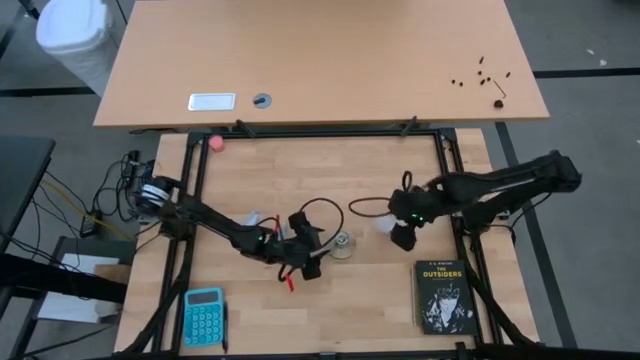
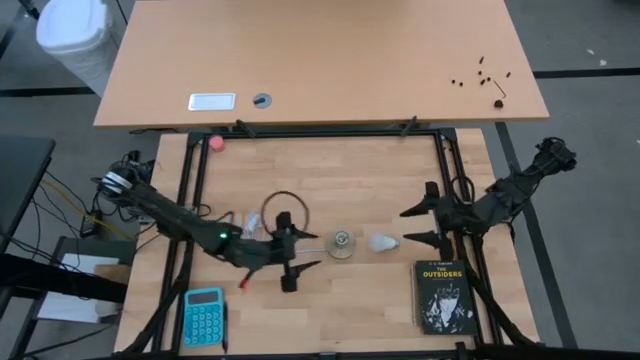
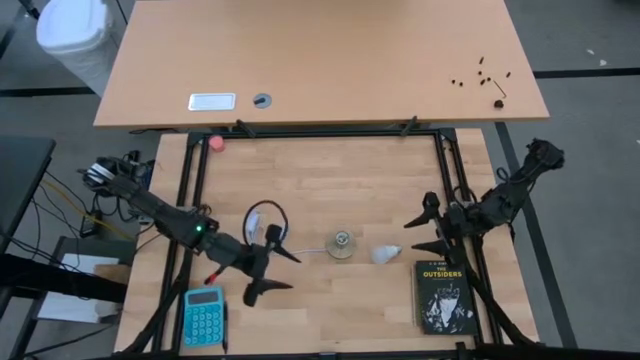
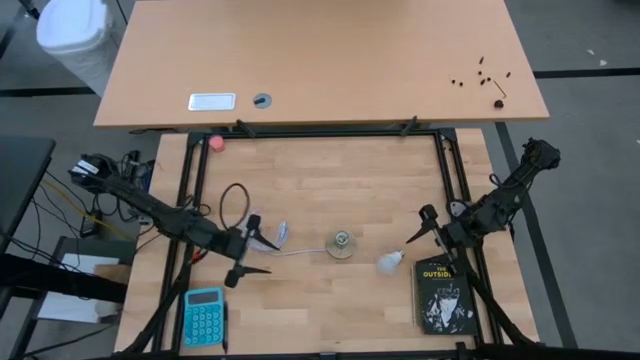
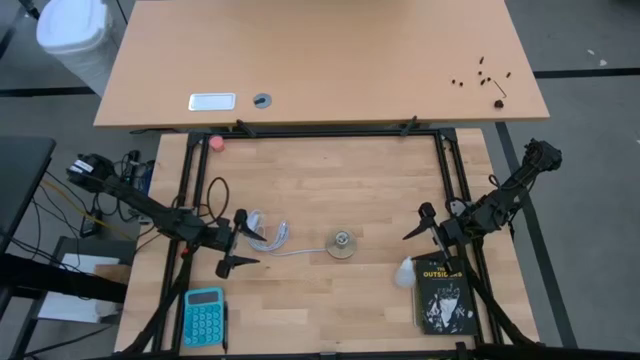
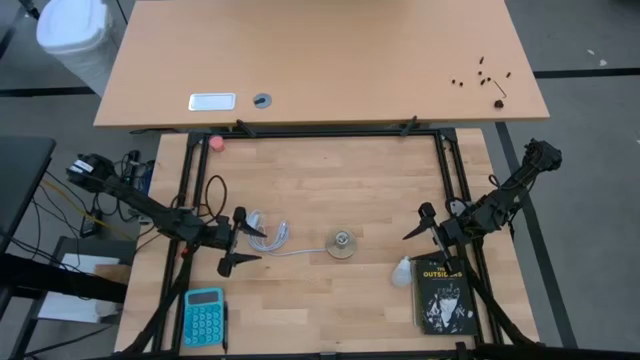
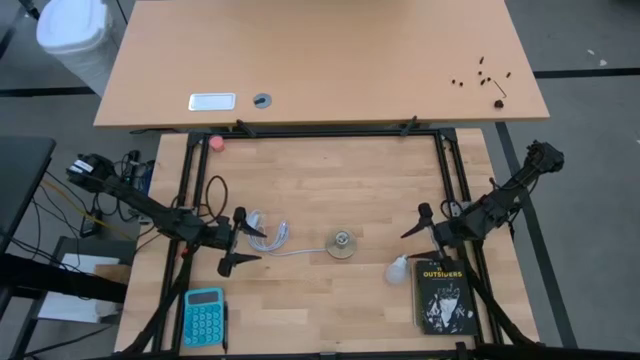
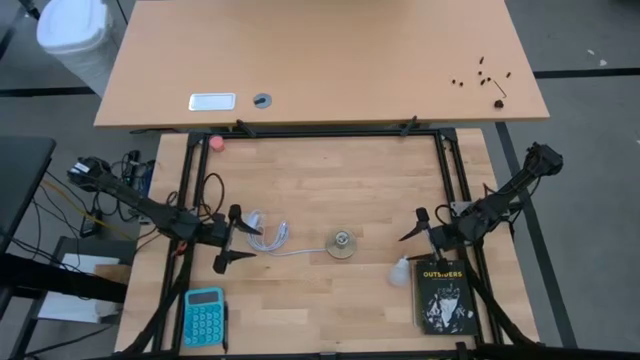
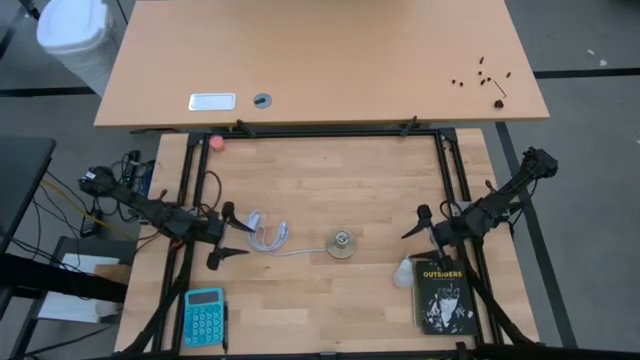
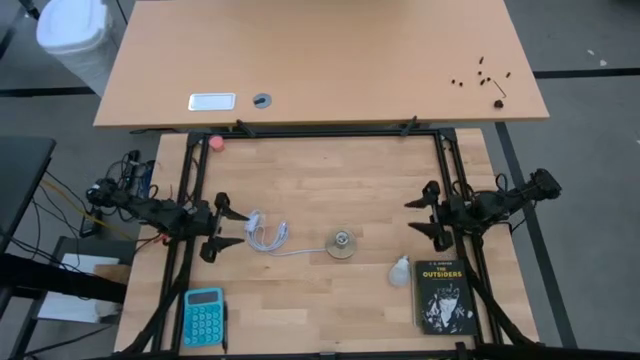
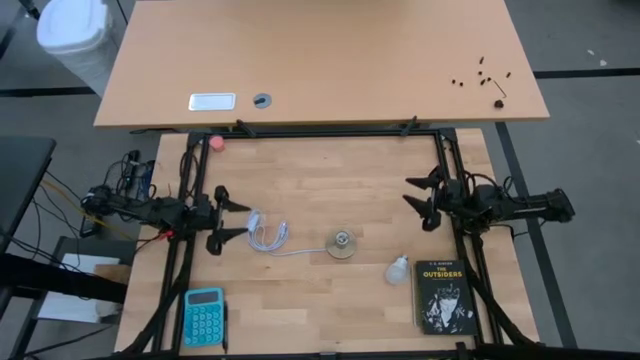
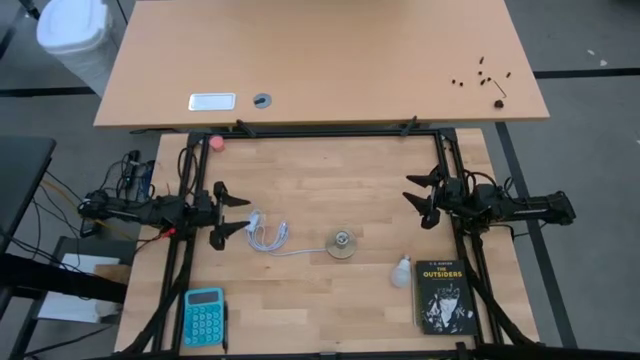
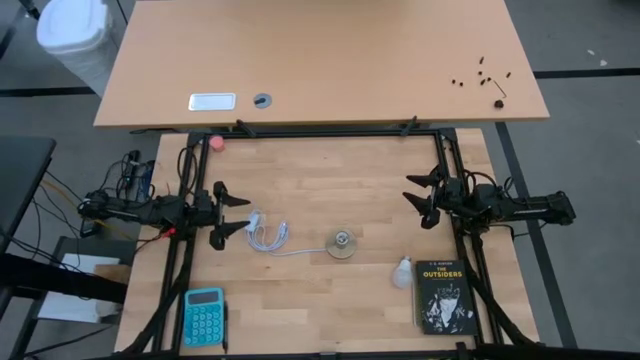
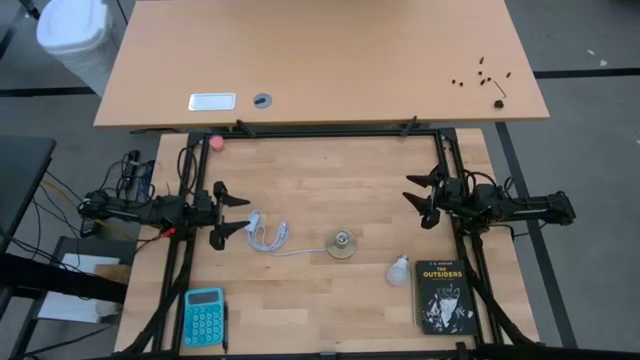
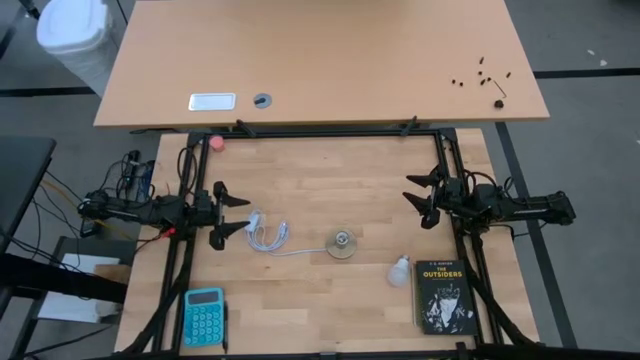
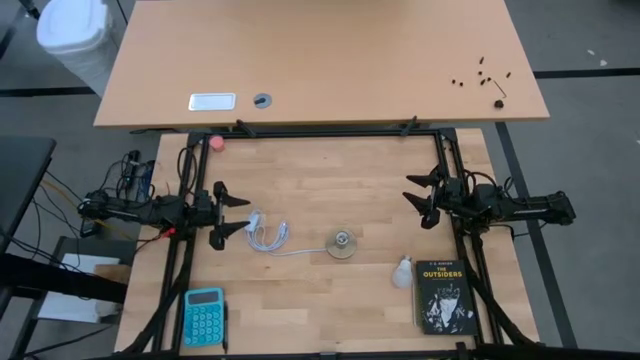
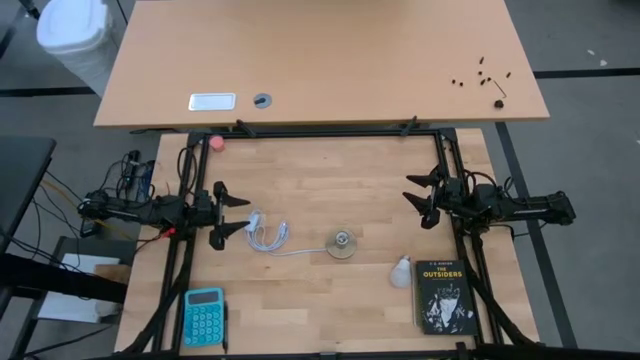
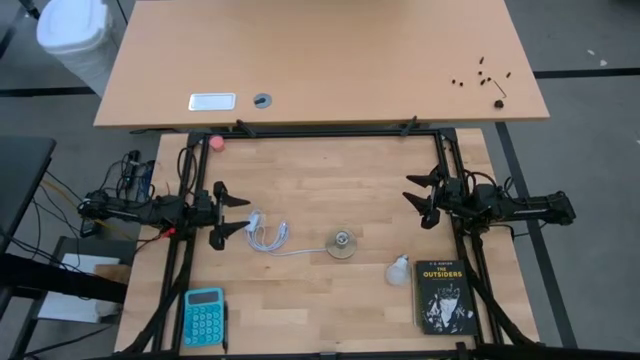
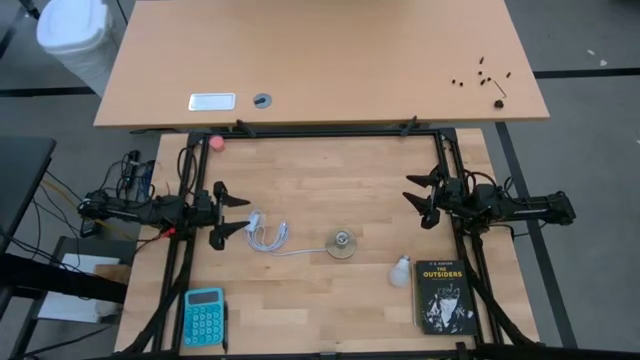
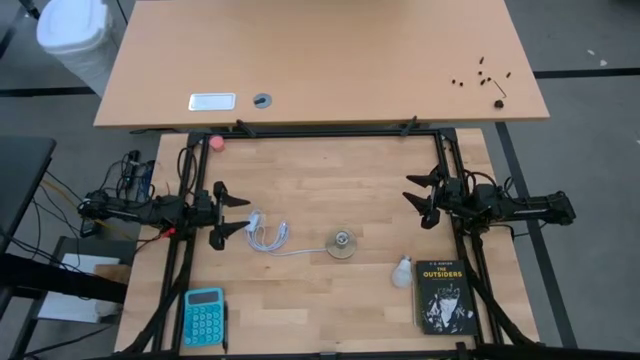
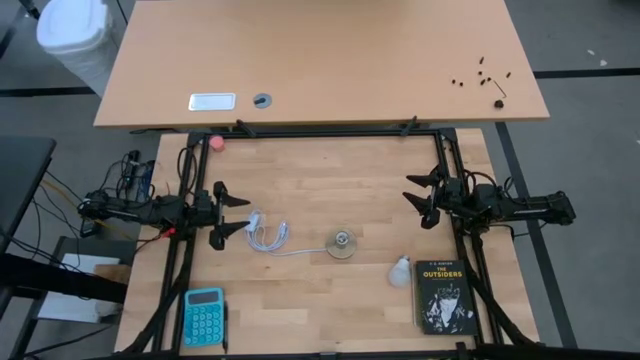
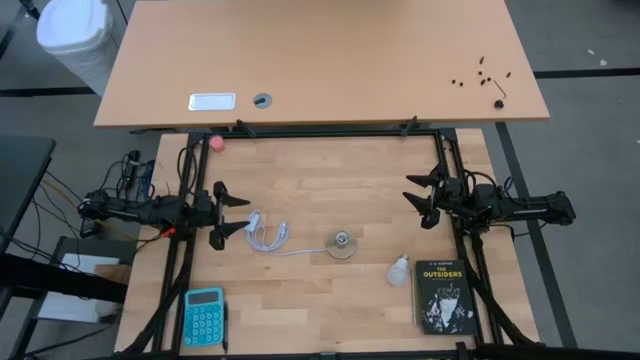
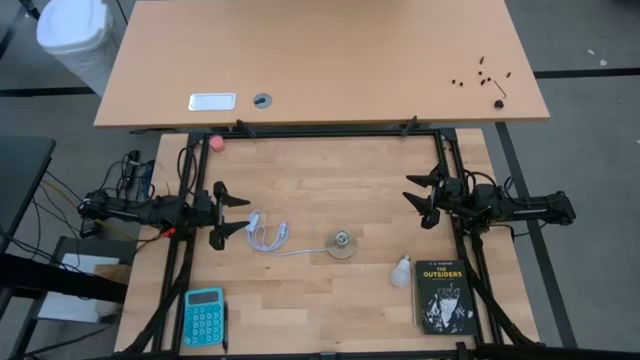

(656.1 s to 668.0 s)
Task: Screw lightbulb
Return to Home Position

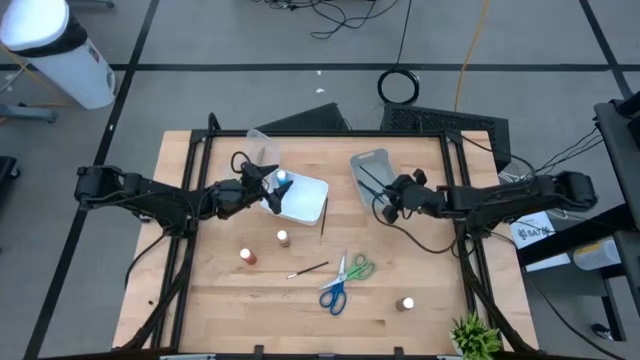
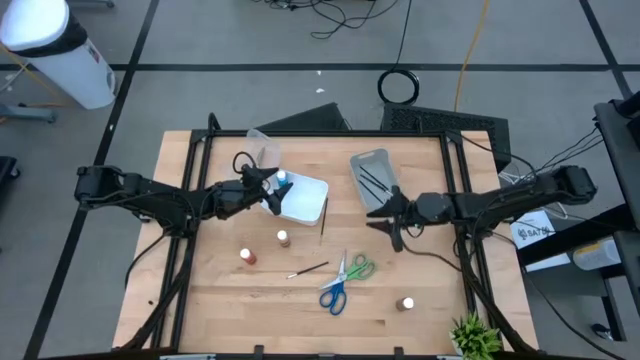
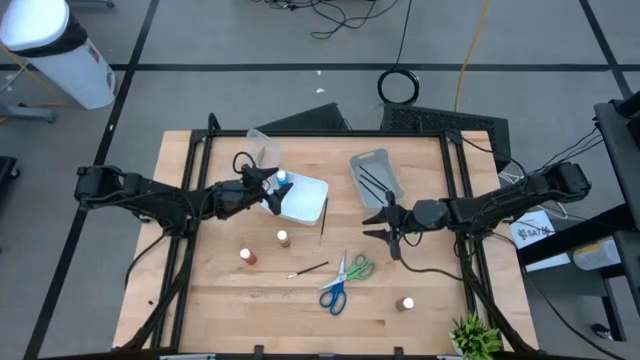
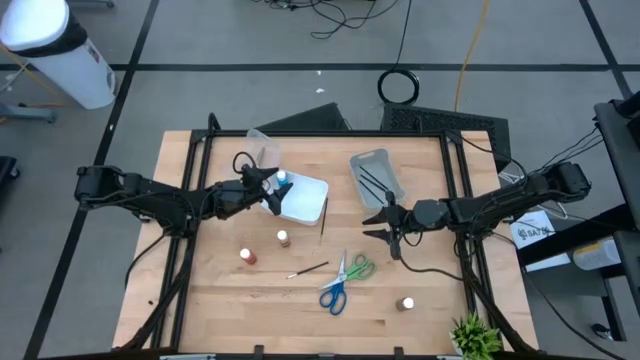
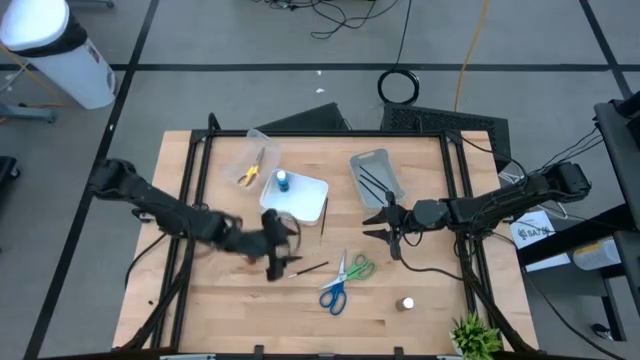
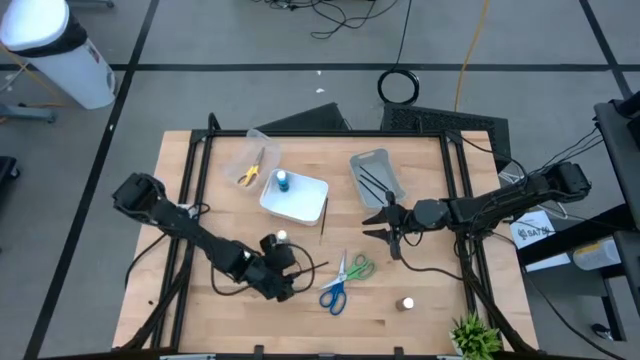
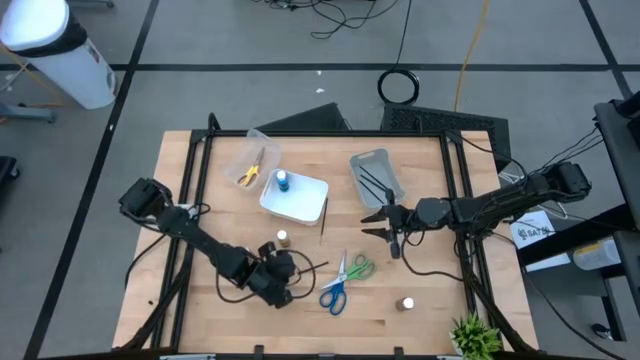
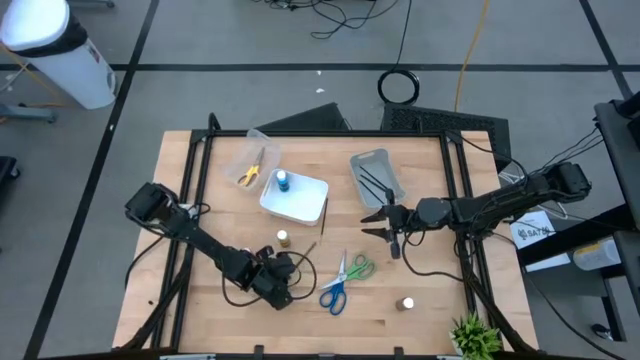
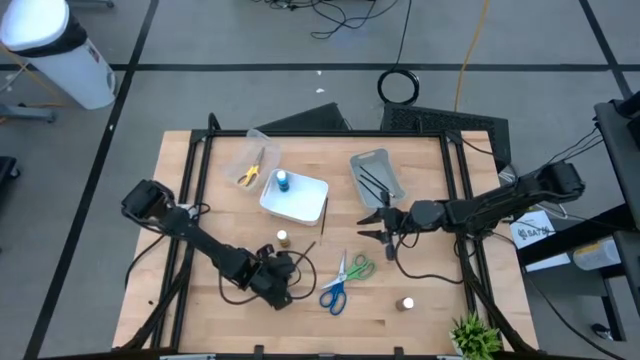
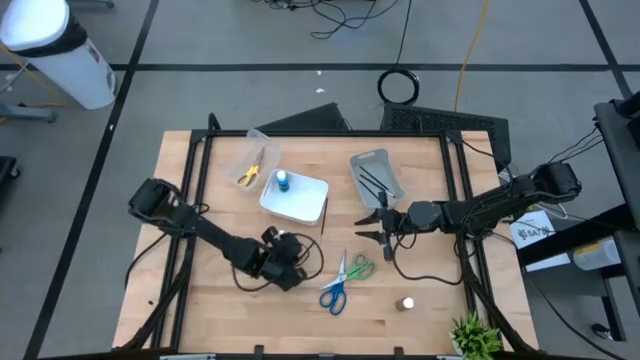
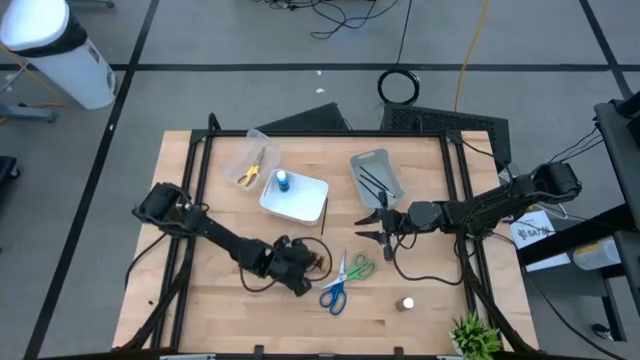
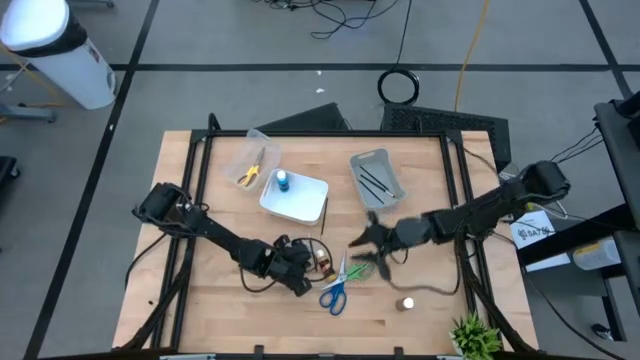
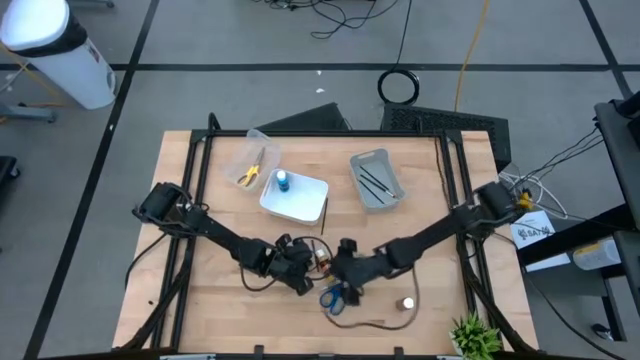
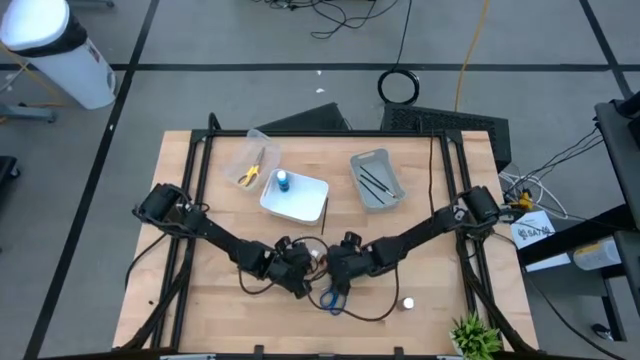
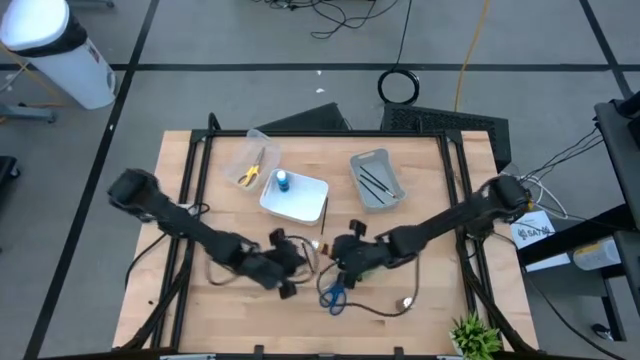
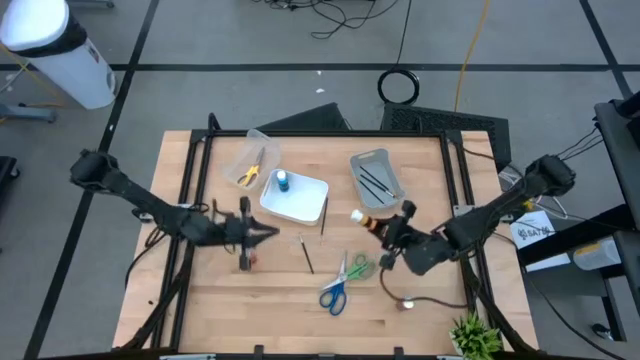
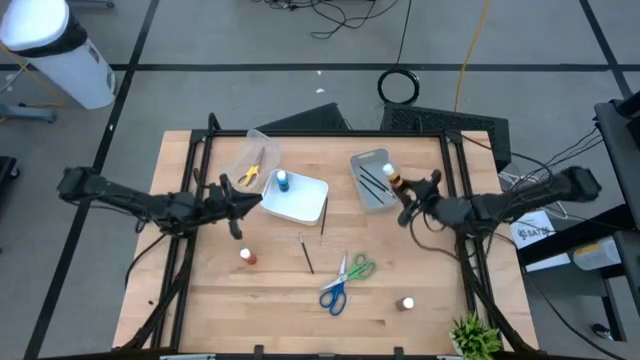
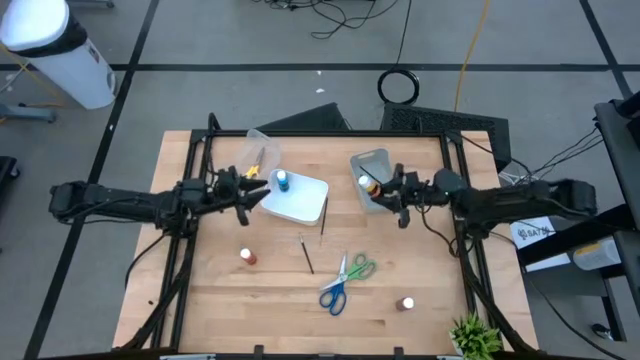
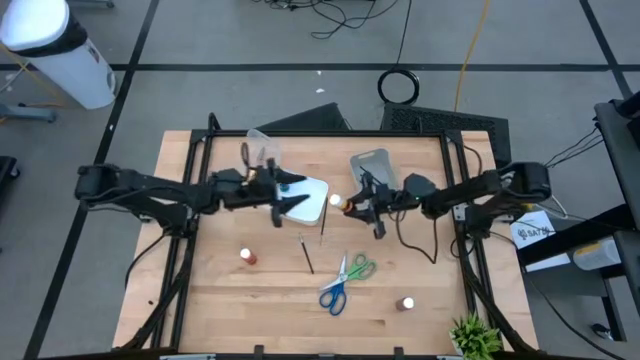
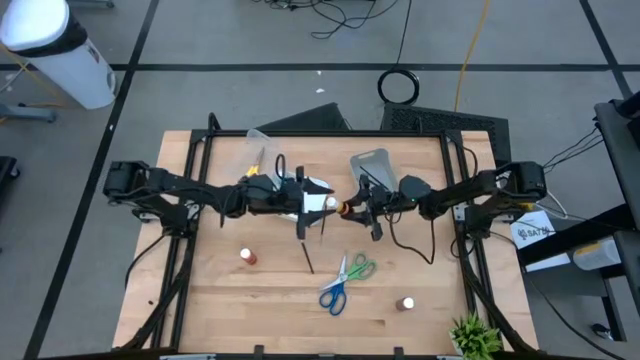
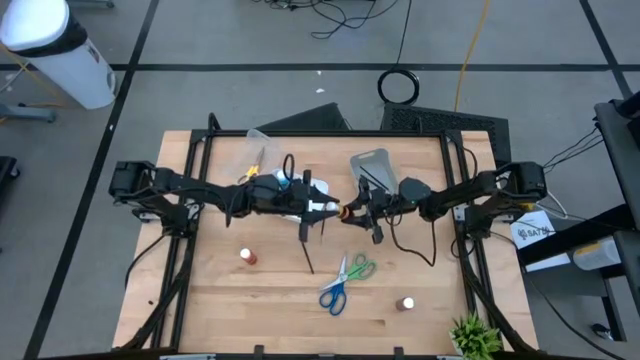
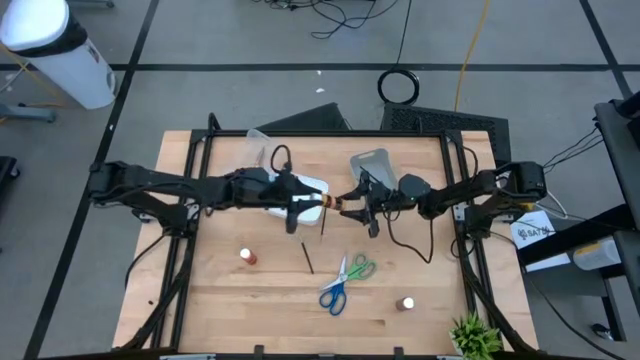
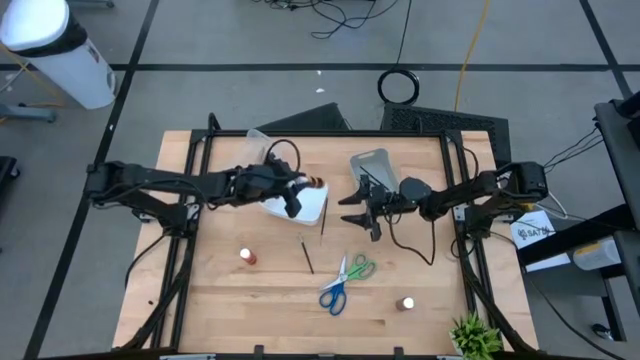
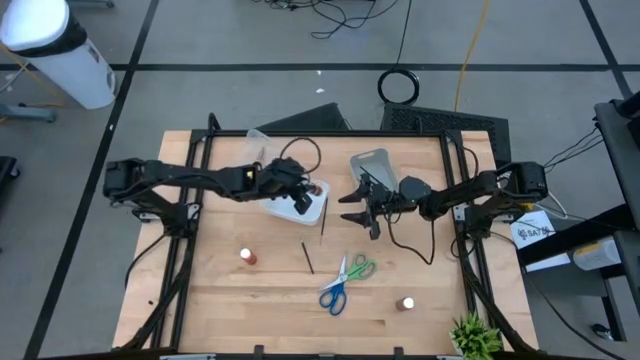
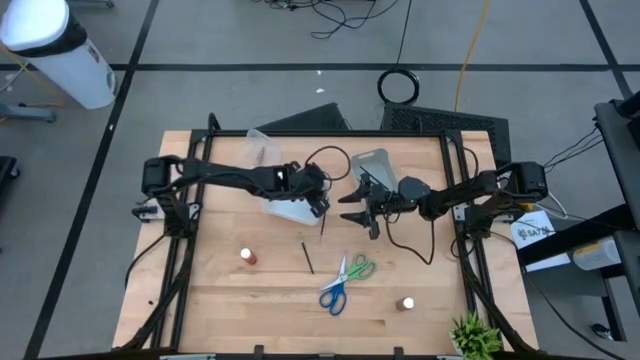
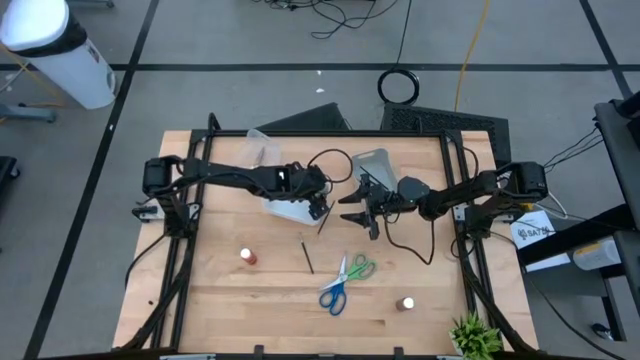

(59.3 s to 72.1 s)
Task: Pick & Place Paint Supplies
Put the yellow paint bottle into the white bin
